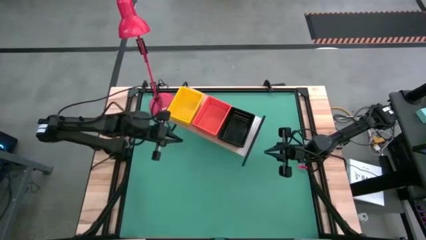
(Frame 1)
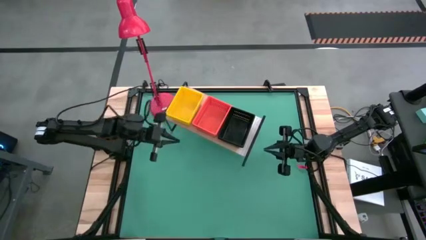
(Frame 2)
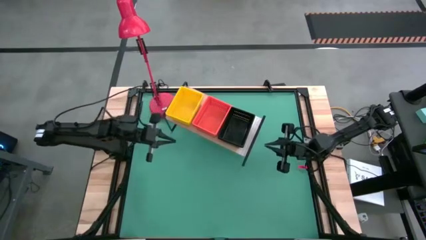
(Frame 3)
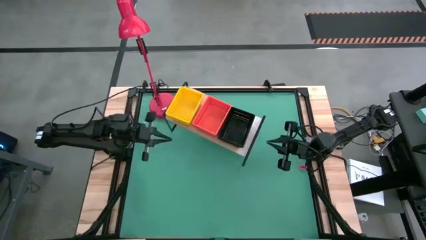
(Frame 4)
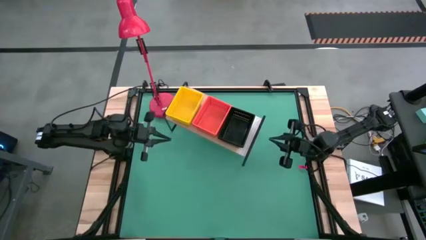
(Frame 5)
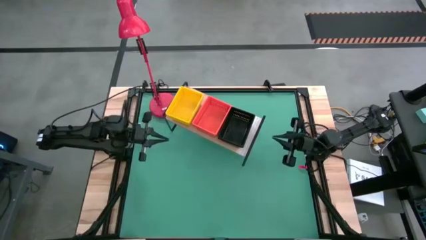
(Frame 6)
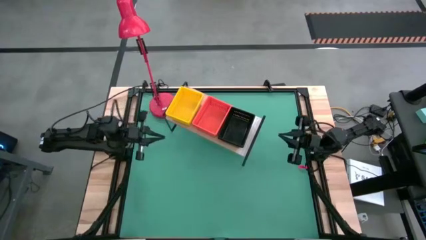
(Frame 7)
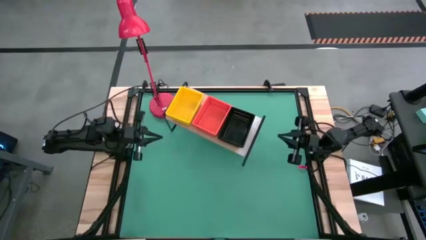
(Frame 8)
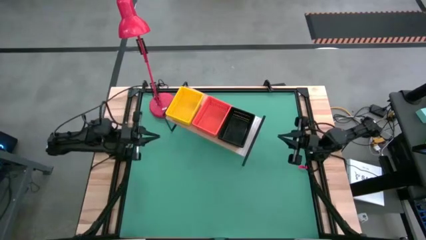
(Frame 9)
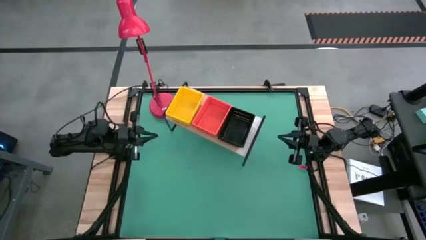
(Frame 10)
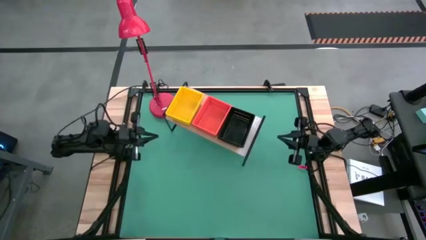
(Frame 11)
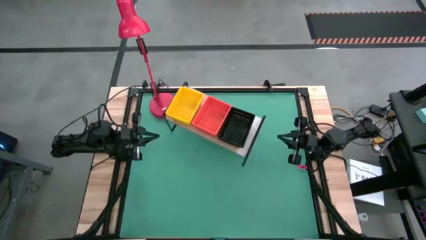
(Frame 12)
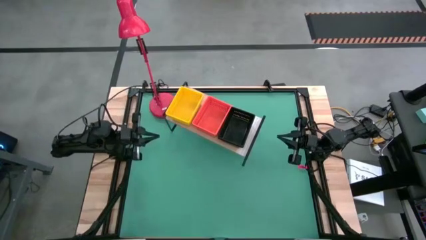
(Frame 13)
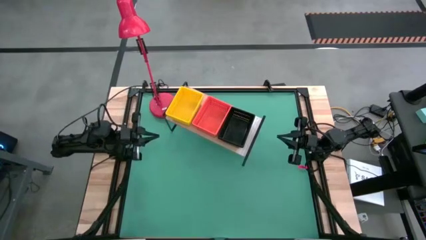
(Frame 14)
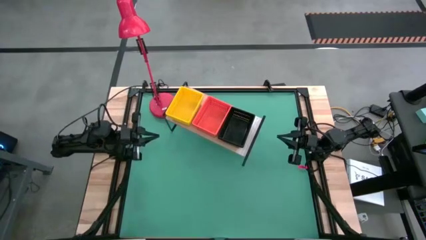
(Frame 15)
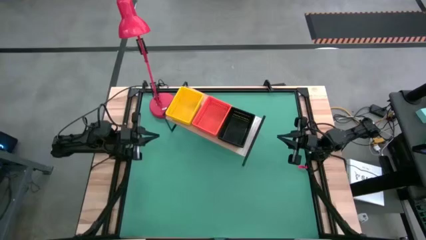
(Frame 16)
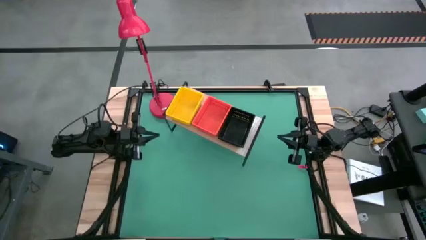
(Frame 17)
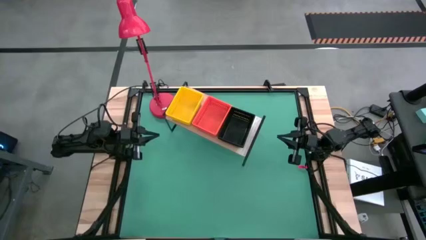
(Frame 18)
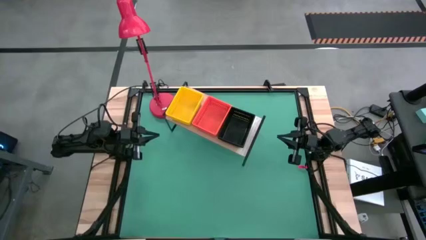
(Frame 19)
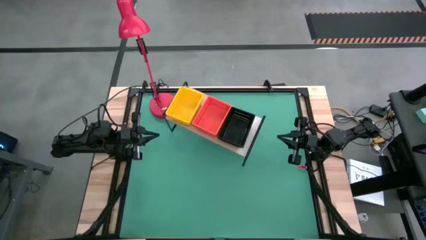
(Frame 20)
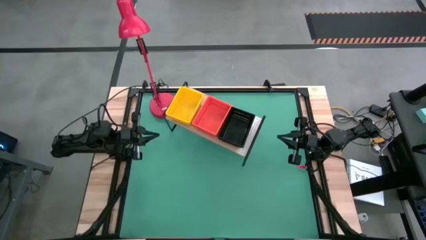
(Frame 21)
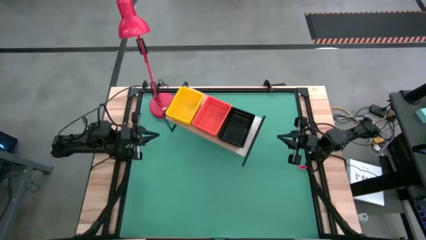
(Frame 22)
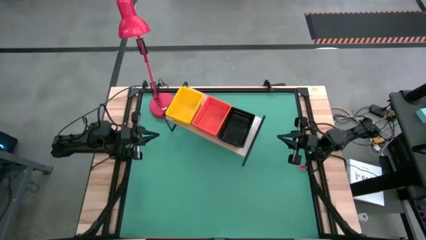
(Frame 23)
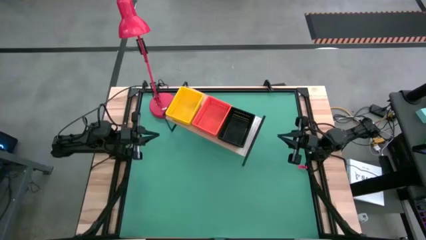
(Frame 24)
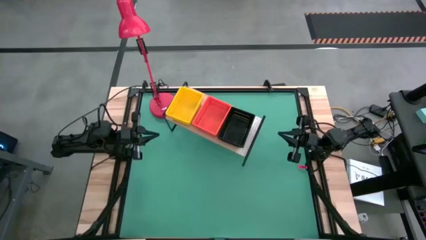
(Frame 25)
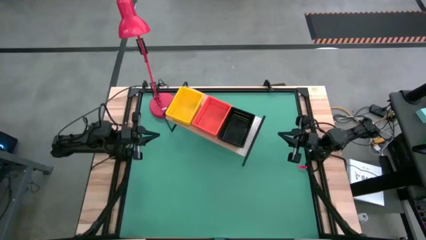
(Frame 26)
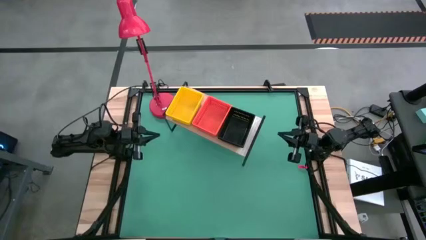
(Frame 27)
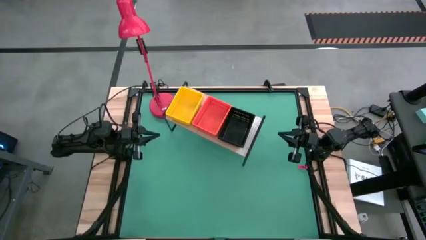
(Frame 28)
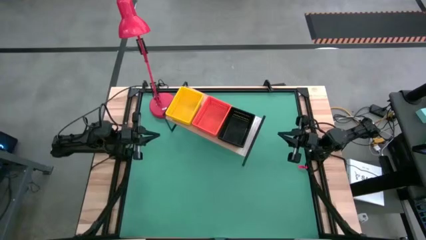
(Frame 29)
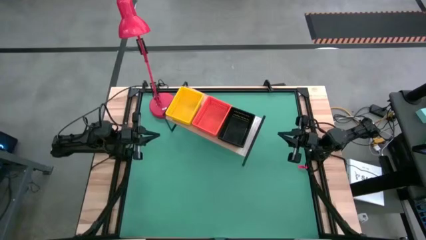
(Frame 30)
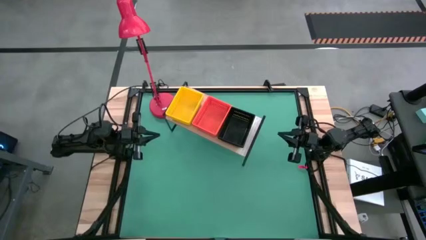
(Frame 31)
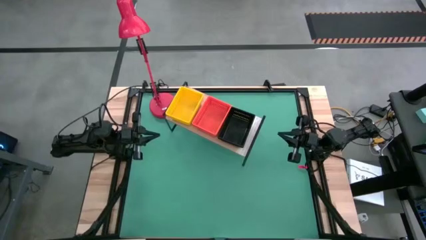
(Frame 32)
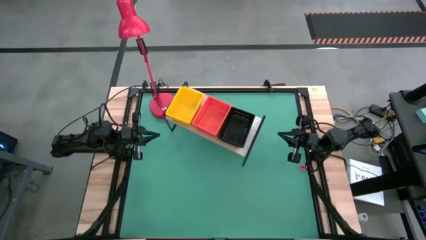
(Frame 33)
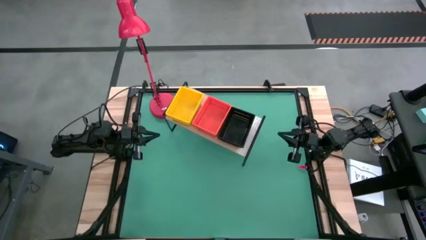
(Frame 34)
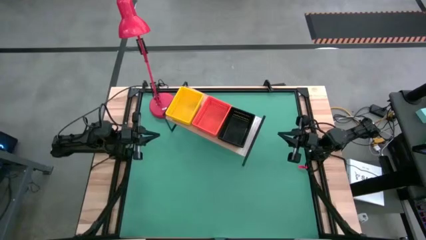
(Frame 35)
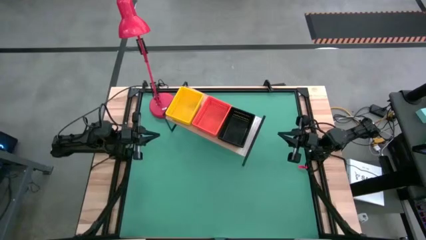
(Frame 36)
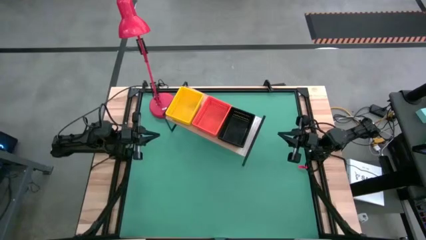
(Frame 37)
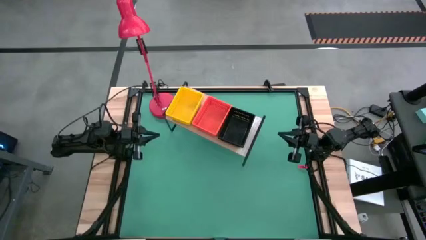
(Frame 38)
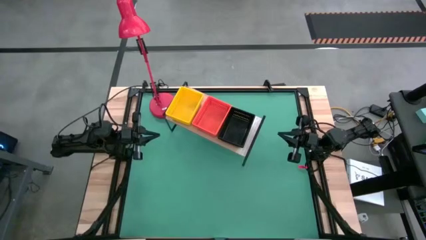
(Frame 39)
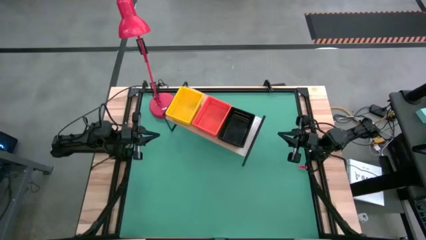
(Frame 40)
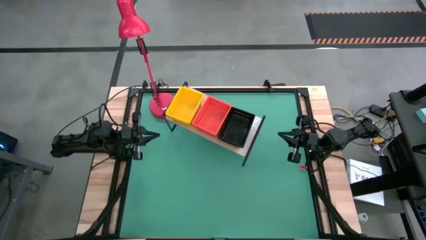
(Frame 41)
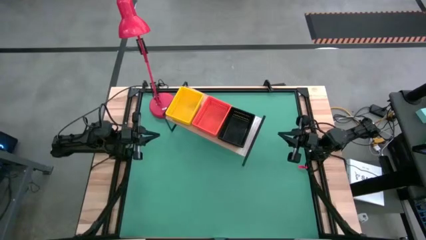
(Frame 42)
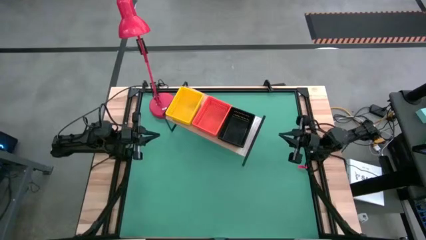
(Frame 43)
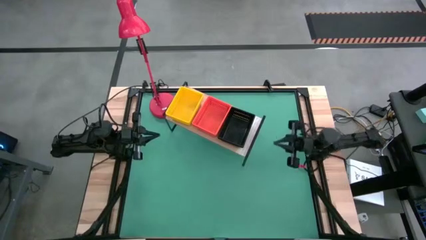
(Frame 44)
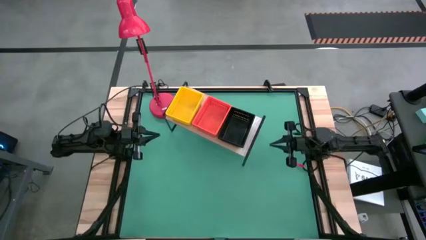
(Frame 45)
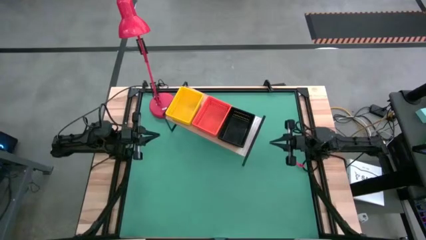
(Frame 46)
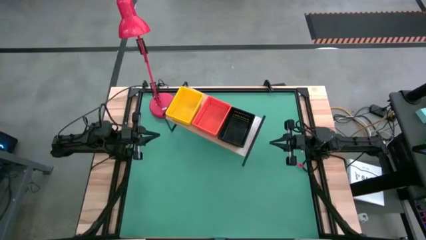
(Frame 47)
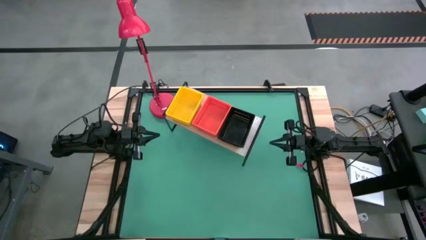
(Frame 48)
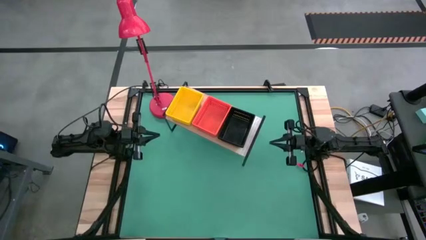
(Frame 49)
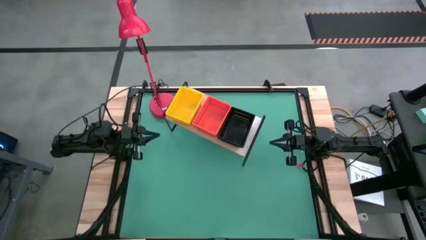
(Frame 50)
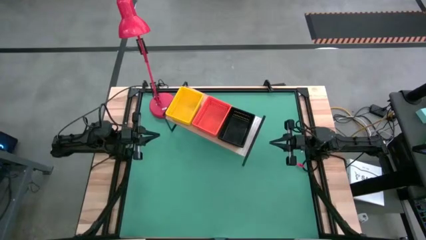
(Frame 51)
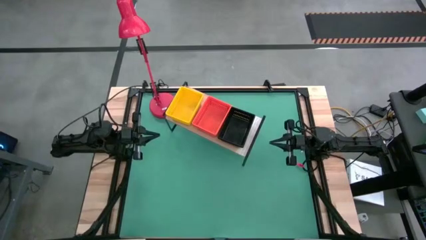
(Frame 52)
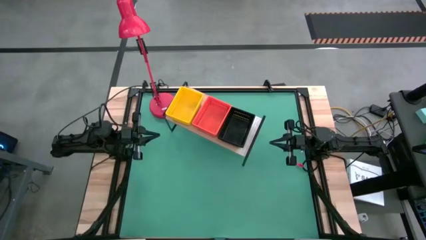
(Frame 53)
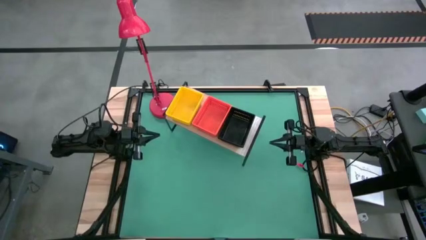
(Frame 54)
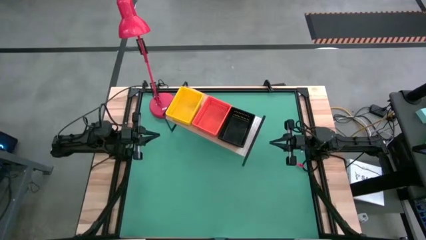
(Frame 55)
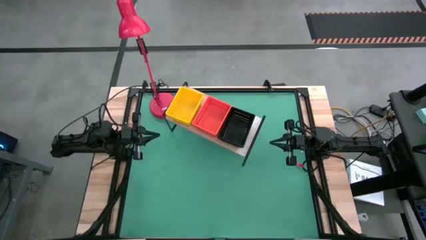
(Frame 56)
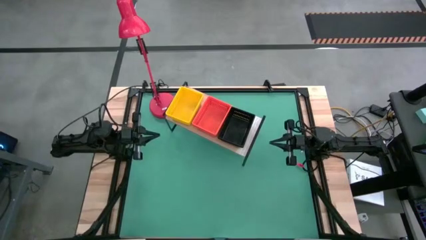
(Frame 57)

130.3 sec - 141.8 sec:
Task: Stack baskets on shelf by color
Return to Home Position

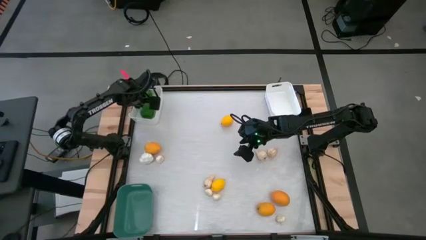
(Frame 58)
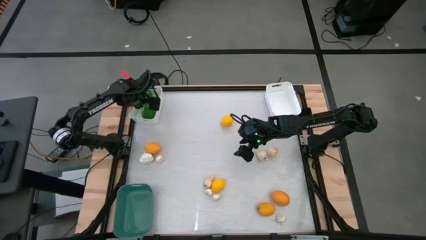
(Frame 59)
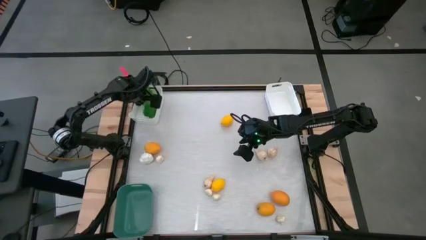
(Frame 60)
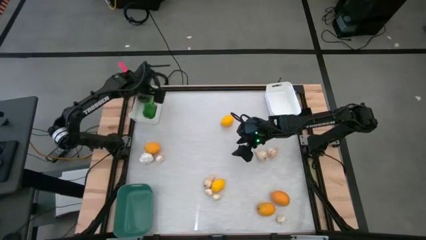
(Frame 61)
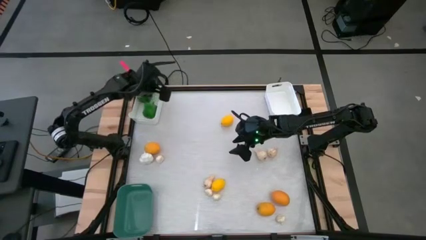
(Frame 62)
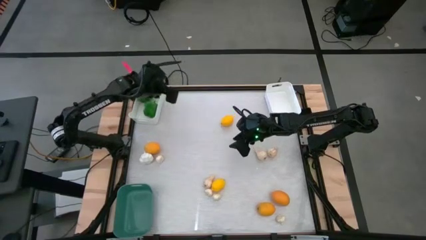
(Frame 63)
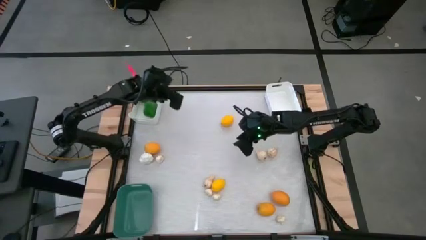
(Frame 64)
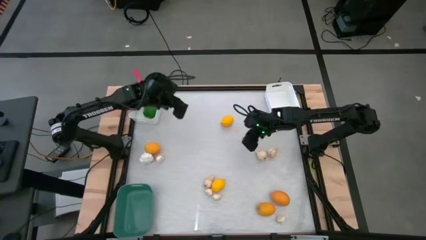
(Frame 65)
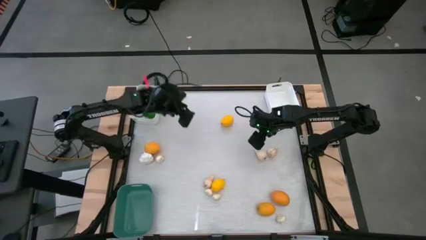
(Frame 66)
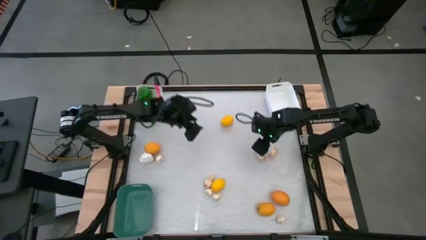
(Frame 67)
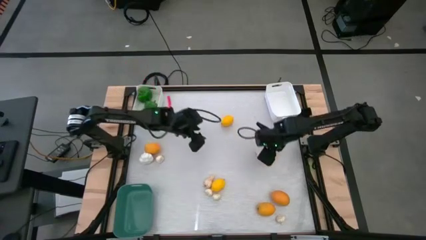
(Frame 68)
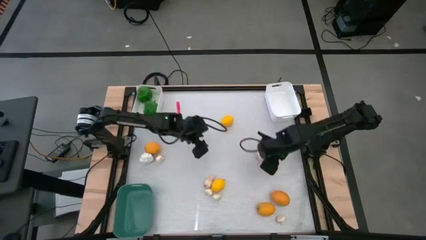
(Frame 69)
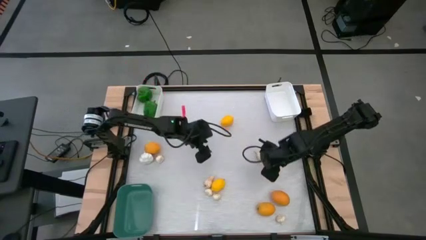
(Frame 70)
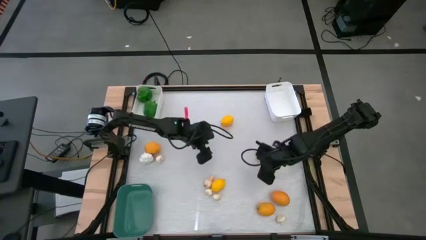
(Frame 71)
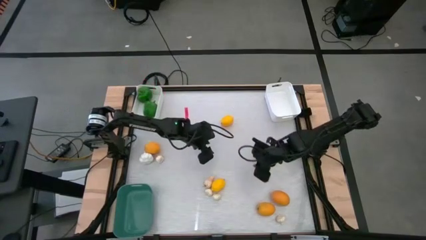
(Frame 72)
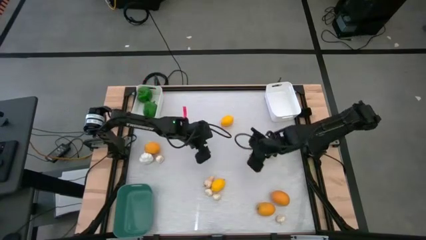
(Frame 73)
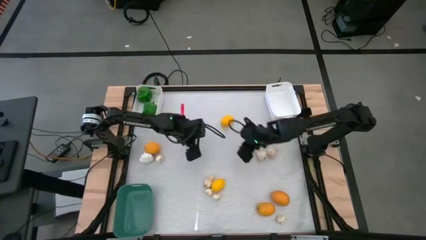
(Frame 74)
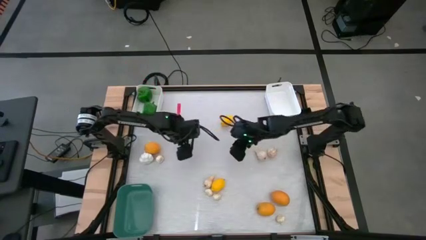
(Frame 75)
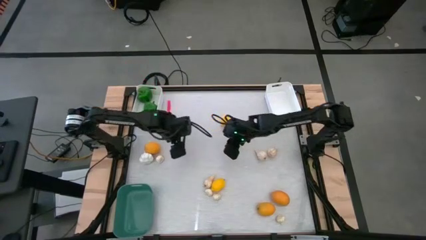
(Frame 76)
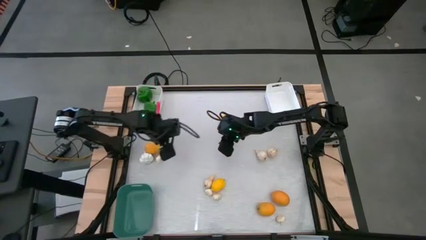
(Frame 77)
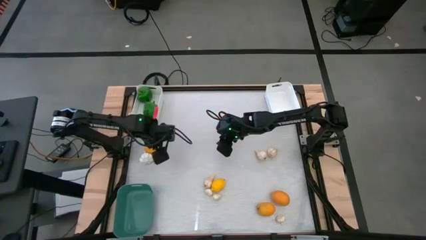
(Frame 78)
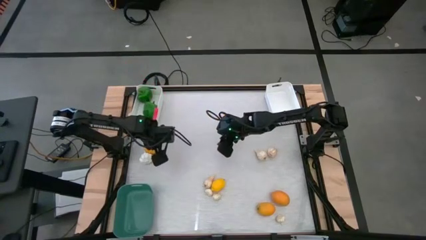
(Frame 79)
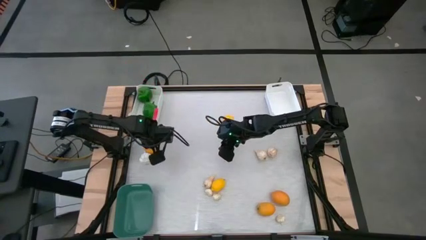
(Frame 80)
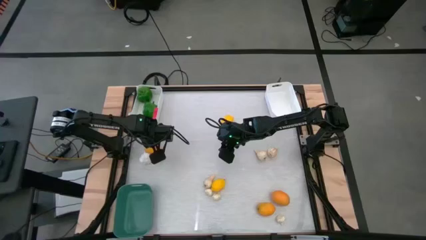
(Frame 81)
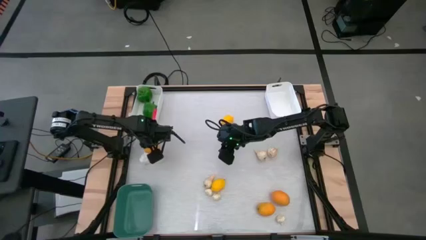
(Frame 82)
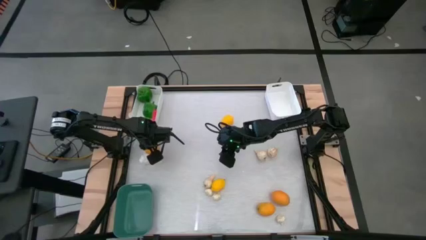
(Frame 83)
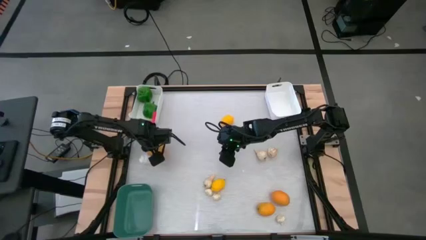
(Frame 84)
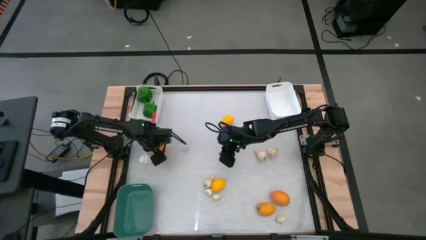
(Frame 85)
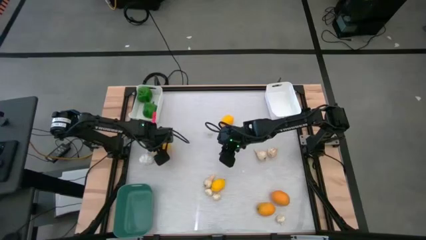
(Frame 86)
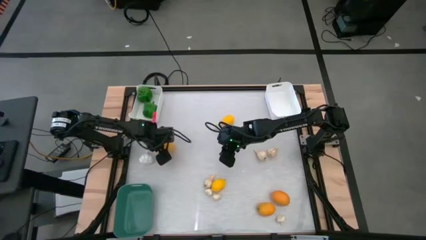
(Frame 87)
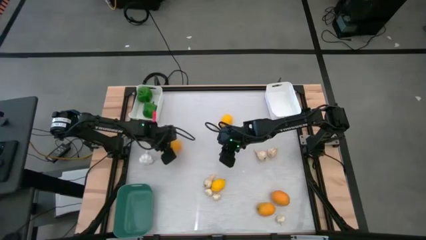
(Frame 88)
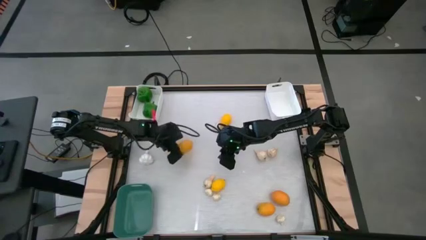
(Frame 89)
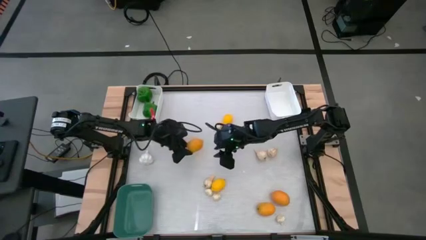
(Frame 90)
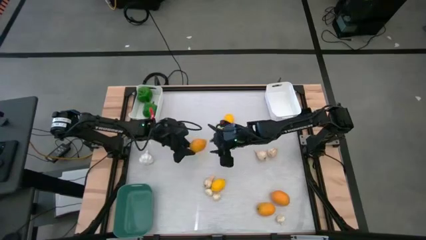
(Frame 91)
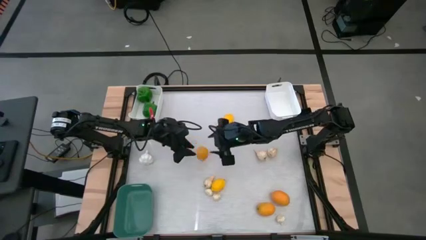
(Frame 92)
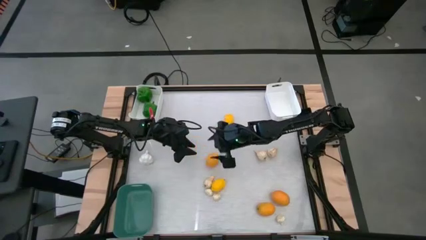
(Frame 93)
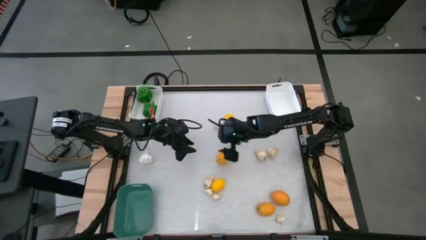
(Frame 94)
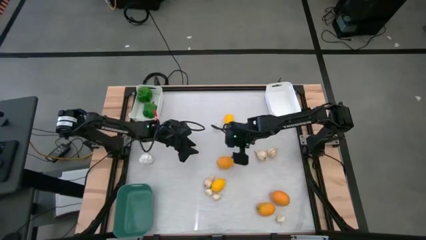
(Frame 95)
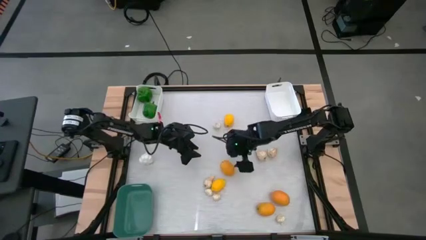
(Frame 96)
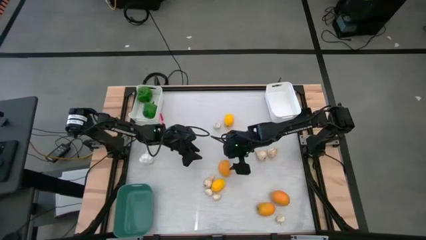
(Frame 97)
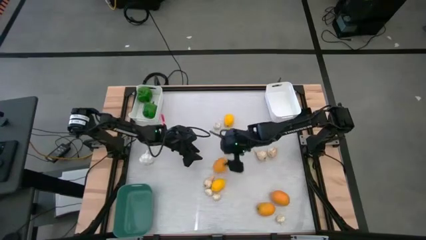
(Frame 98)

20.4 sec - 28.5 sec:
Task: Sort produce into baskets
Put the yellow lemon into the right white bin
